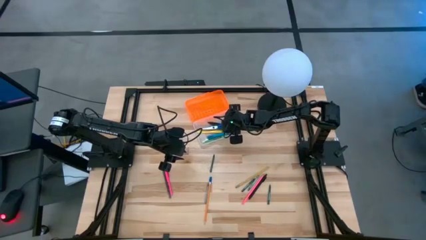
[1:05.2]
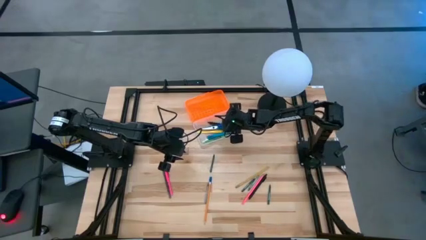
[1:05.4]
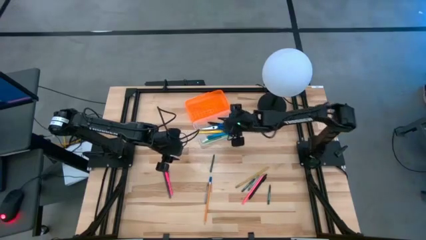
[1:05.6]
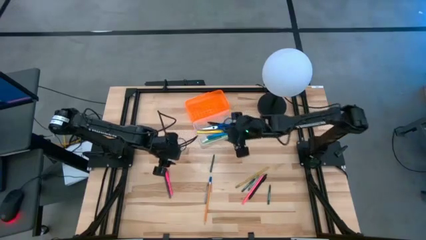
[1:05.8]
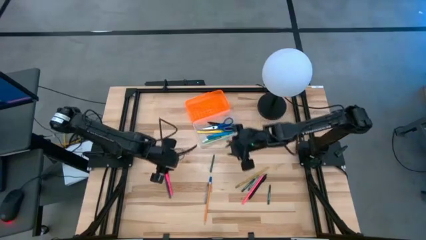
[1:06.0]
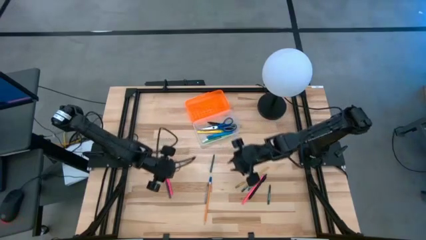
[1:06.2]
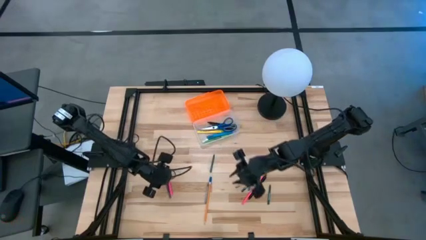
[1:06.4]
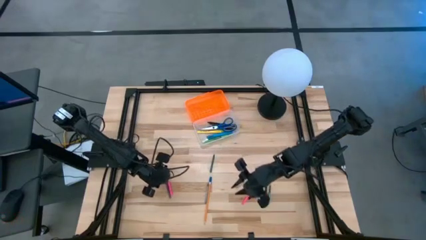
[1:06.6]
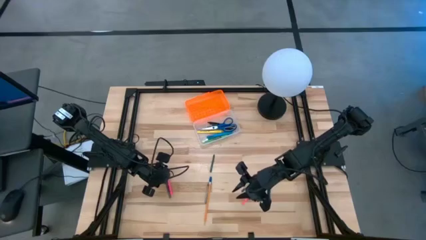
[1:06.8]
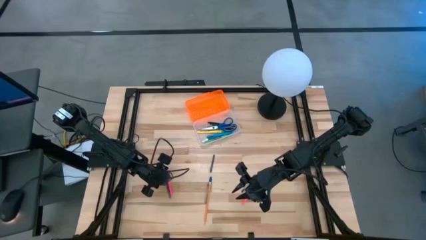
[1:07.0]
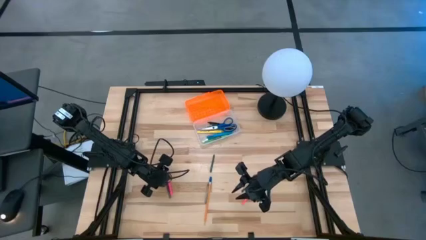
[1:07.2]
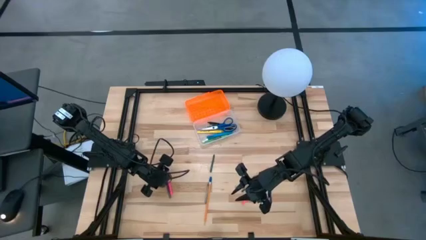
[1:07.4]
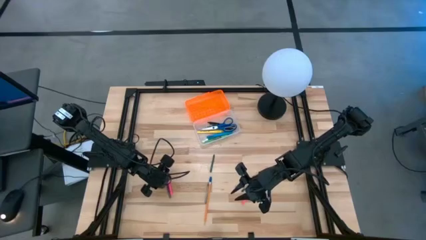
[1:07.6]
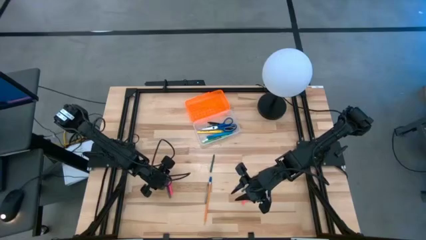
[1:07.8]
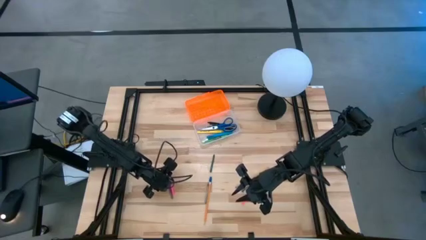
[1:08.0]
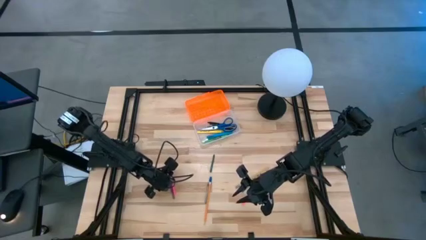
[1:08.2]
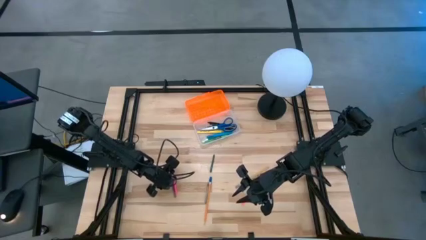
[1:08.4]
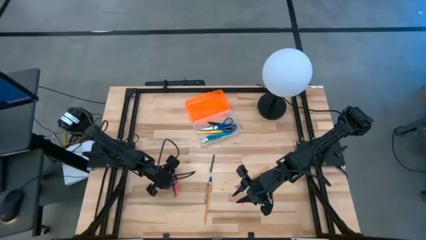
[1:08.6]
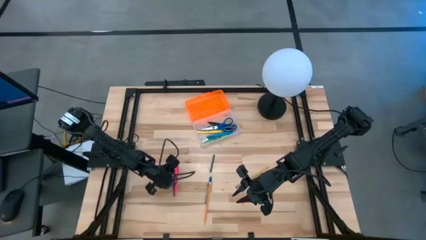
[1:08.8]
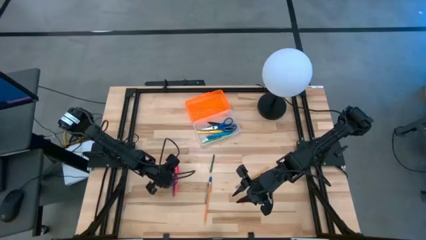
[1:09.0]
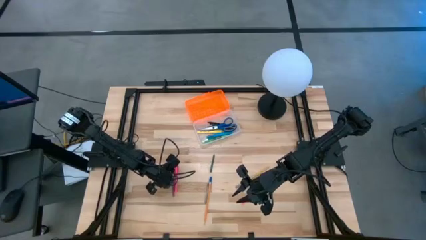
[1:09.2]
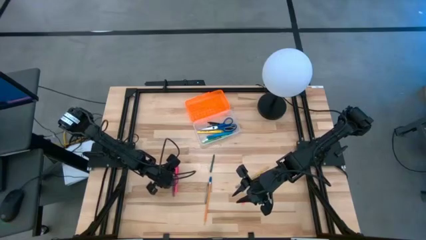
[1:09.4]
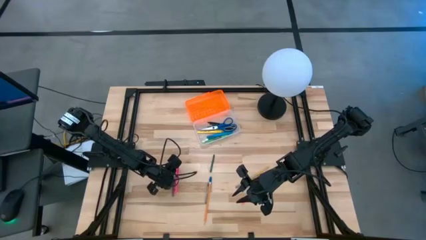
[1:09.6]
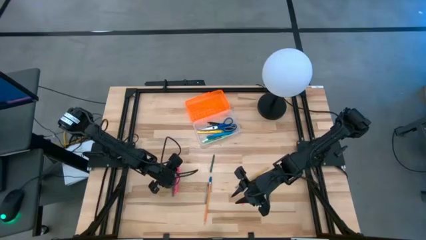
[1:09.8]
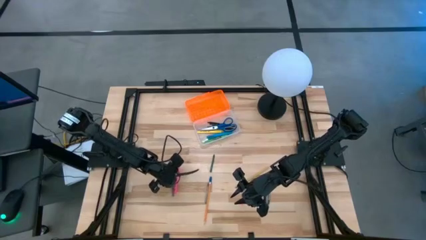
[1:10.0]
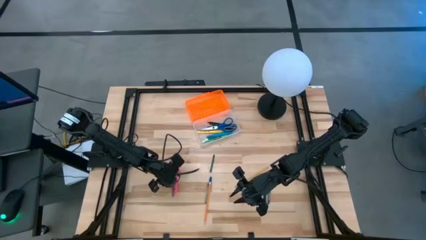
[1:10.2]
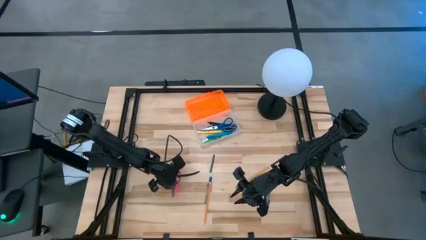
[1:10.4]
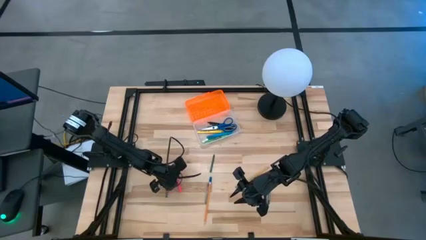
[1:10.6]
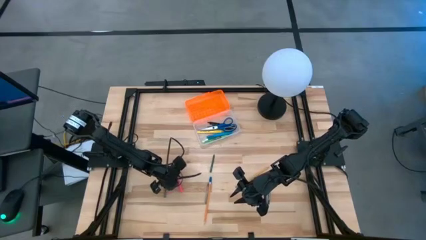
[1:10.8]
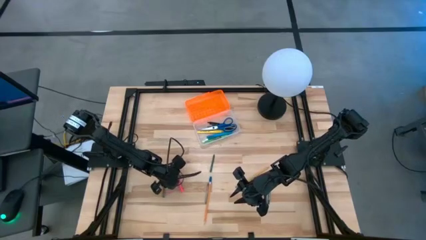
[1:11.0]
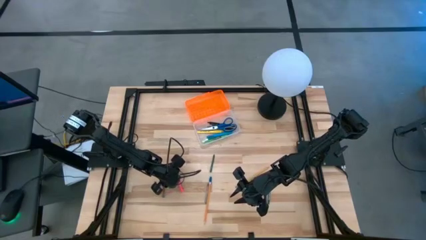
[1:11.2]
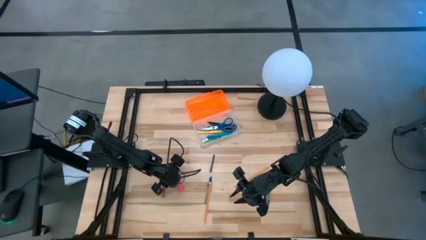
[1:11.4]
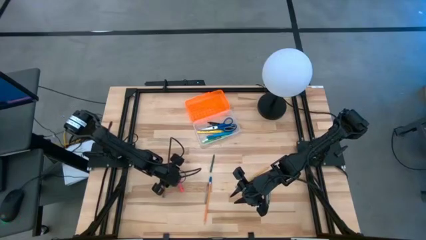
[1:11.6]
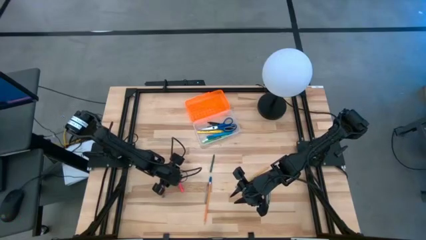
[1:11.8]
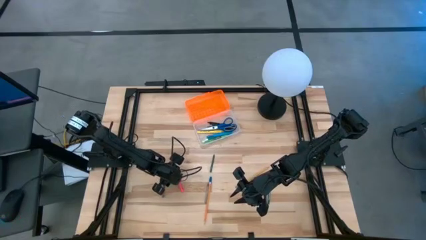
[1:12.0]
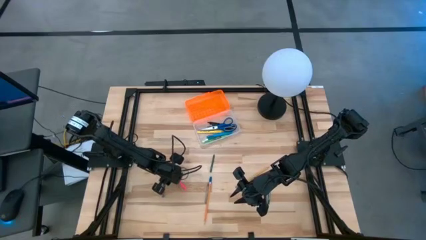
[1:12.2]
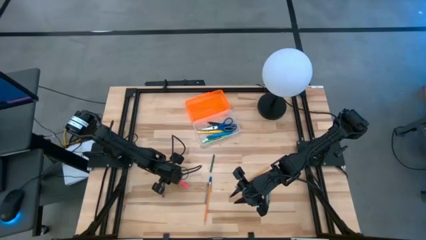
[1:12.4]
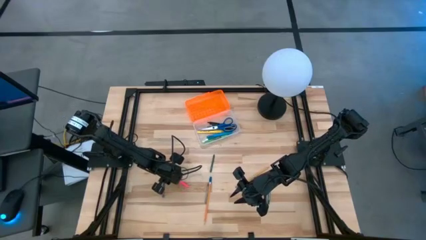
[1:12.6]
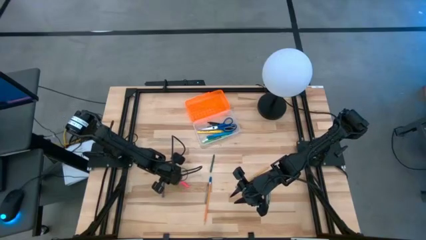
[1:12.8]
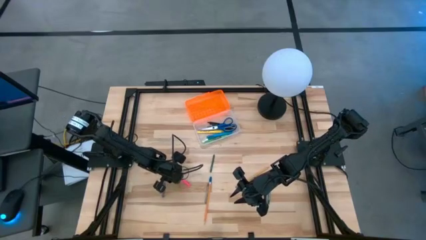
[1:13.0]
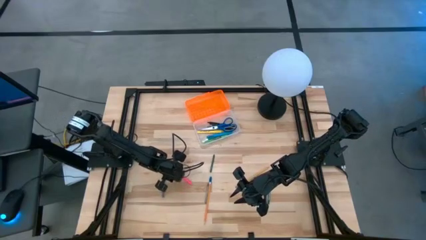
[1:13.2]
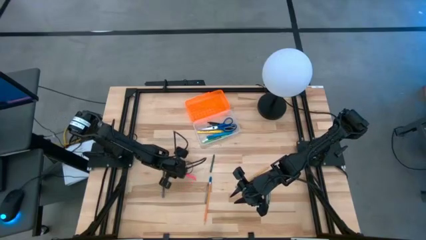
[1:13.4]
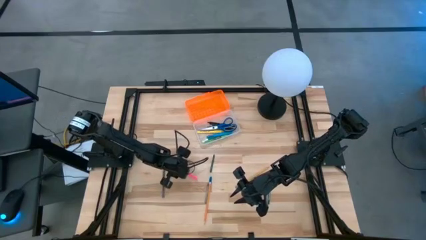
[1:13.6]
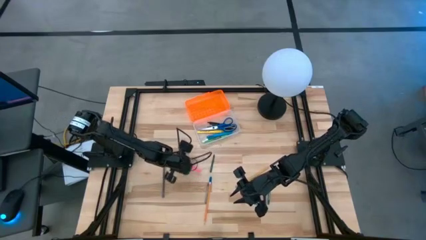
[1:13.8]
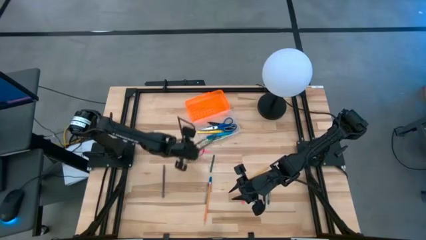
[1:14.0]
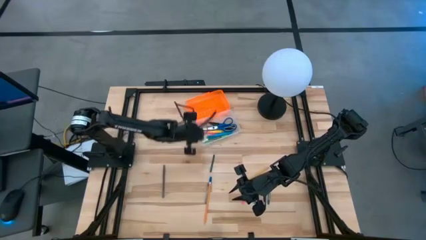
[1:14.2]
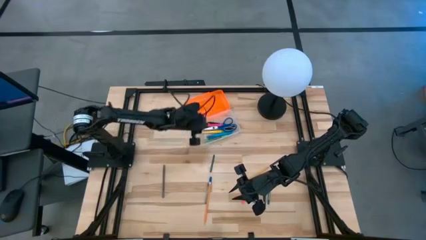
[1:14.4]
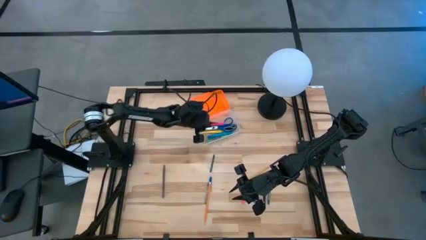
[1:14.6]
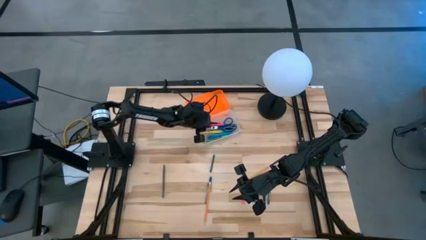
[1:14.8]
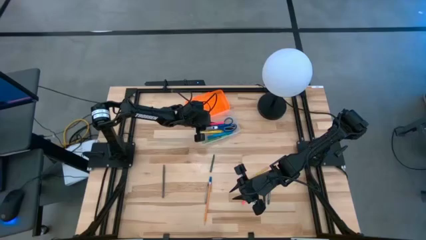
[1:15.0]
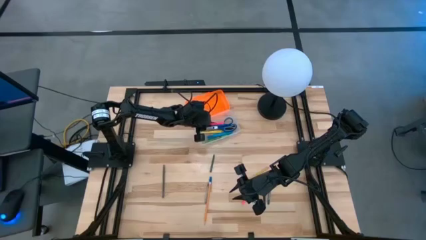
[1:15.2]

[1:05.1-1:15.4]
Task: Pick & place school supplies into a supply box
Put the pink pen into the supply box

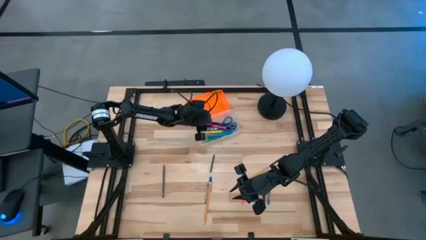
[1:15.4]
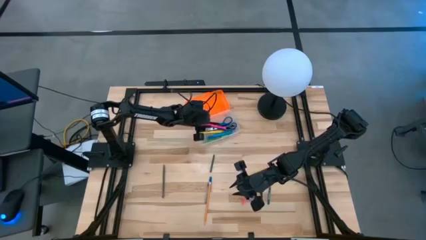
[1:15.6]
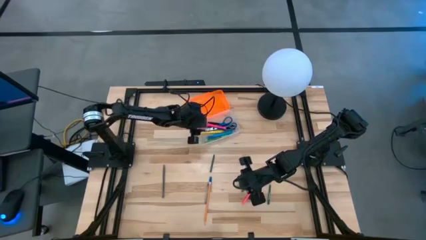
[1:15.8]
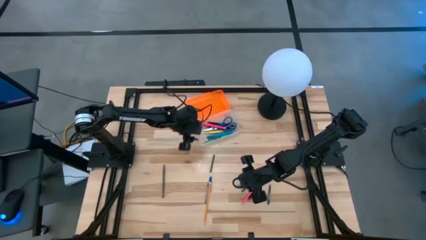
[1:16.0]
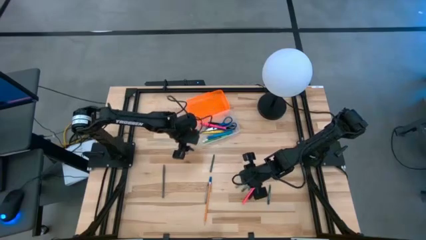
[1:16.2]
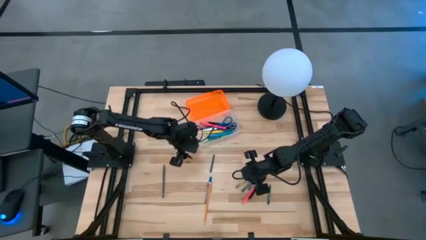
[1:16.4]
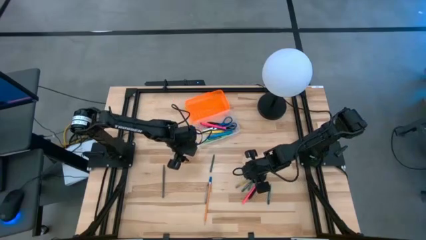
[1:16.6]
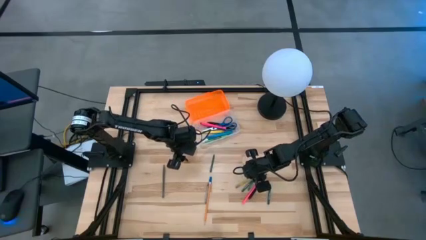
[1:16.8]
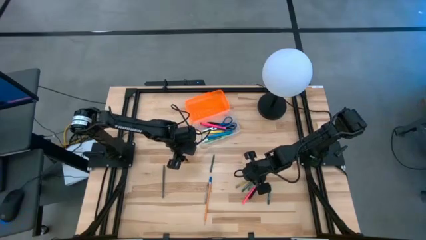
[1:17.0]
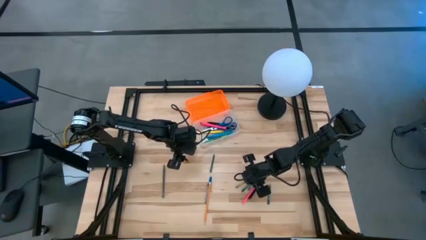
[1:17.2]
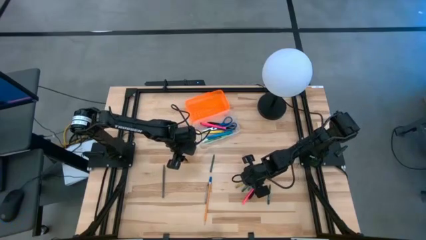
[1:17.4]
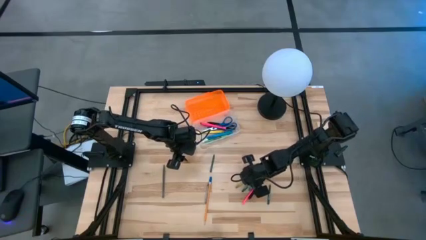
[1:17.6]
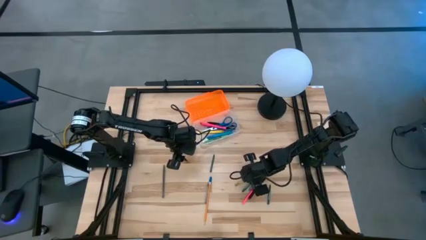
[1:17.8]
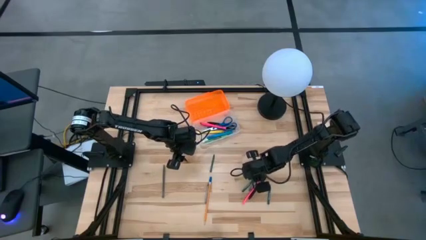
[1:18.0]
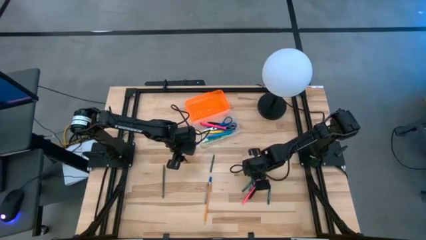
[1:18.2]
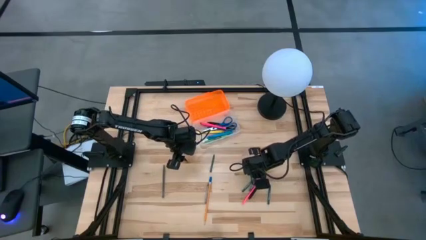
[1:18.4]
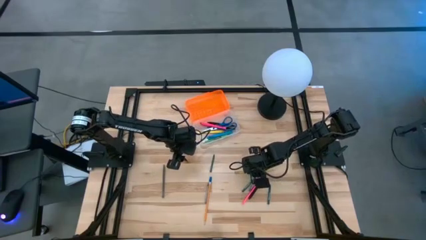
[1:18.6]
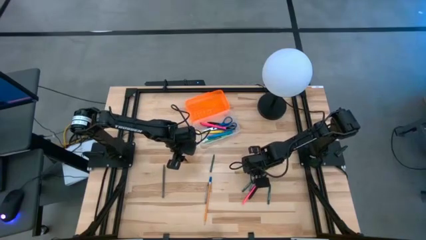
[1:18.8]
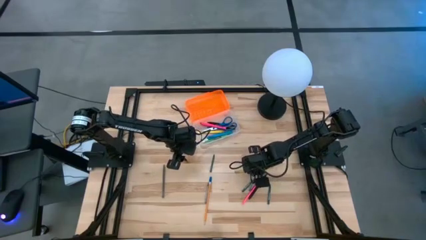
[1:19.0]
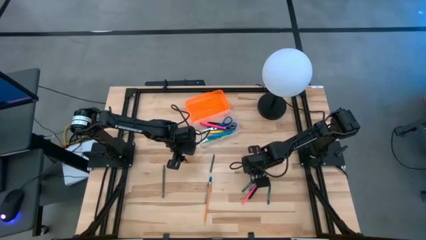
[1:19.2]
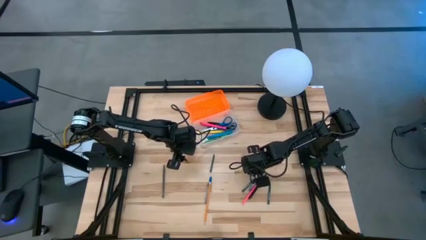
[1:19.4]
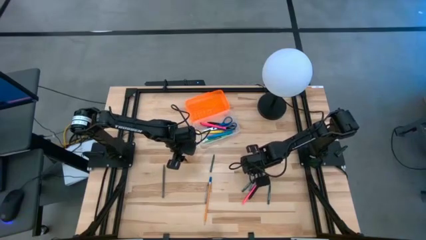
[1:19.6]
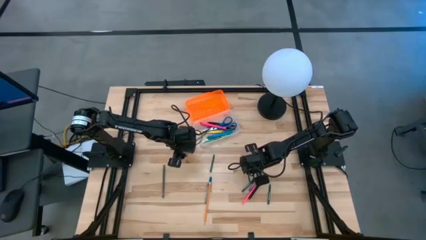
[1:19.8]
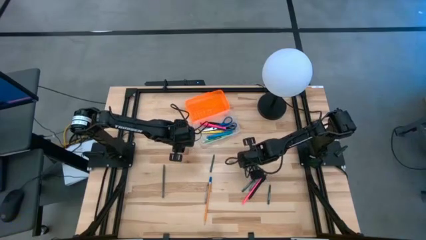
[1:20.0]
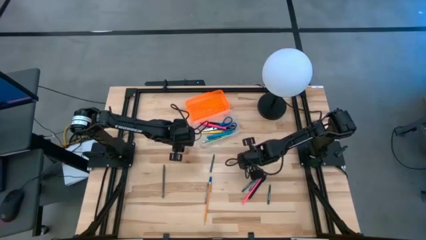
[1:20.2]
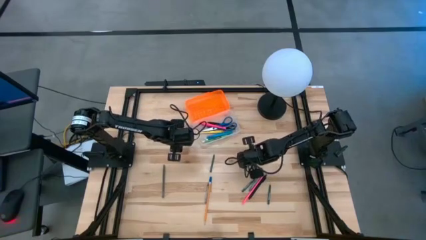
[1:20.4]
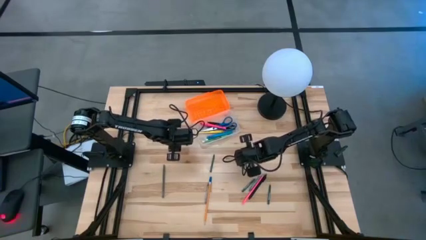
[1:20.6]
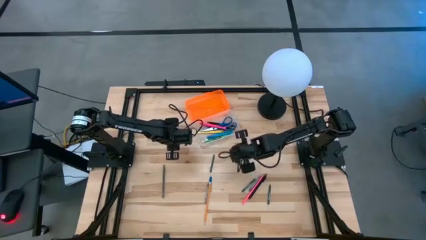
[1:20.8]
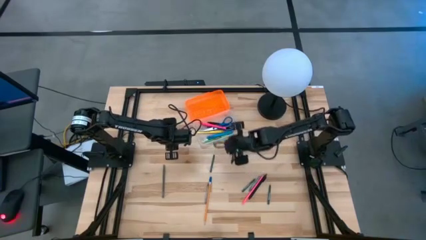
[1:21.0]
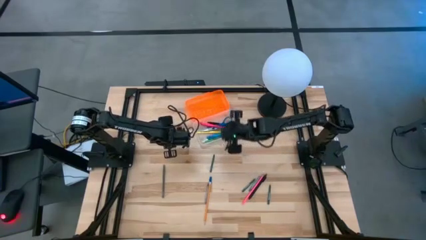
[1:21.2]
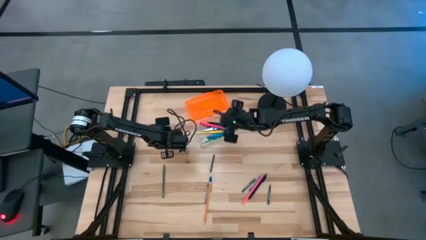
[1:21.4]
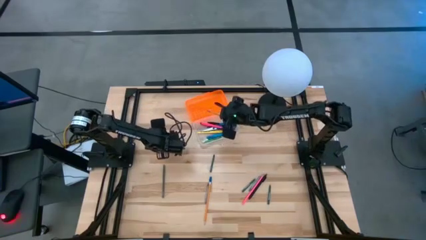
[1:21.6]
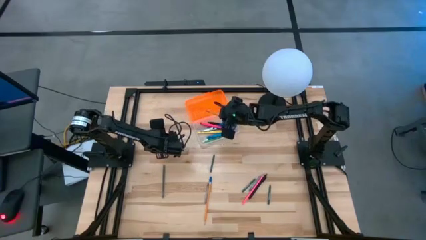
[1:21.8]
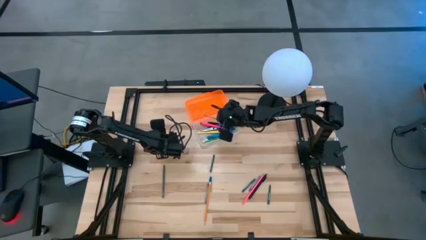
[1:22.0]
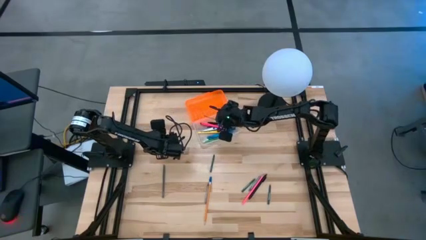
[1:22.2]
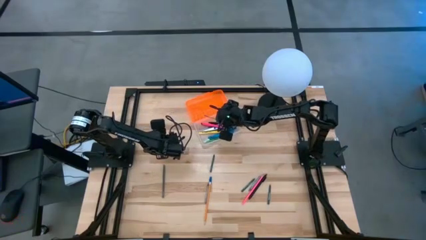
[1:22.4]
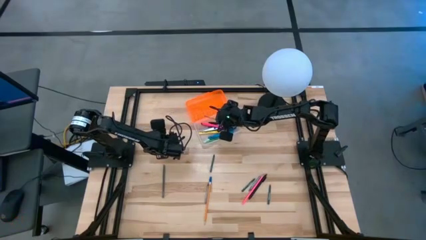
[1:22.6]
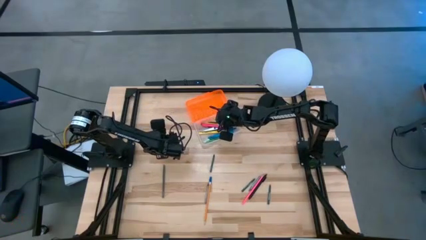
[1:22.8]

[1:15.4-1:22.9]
Put the yellow pencil into the supply box
